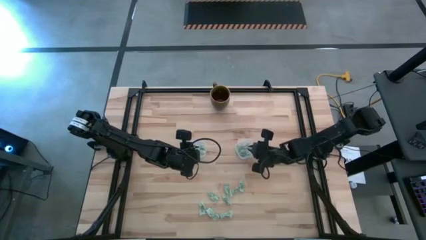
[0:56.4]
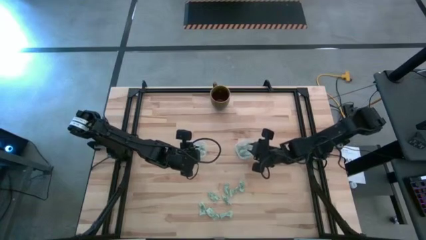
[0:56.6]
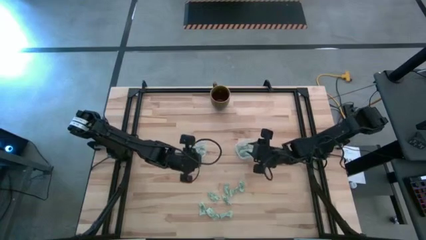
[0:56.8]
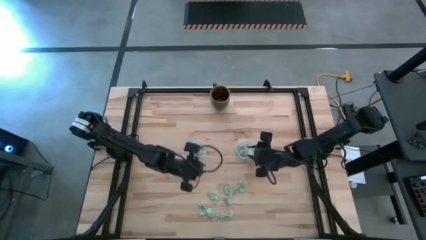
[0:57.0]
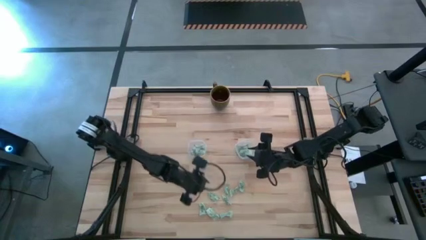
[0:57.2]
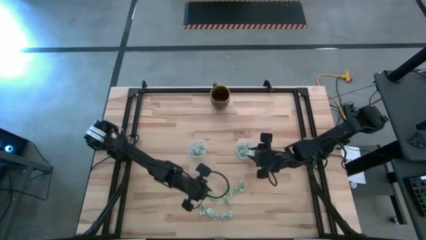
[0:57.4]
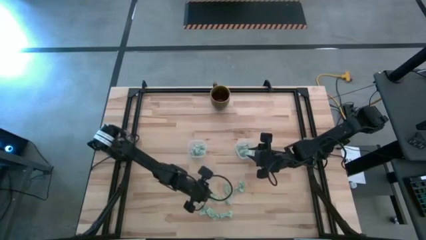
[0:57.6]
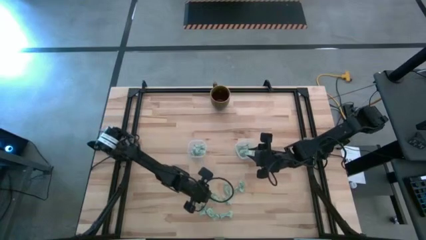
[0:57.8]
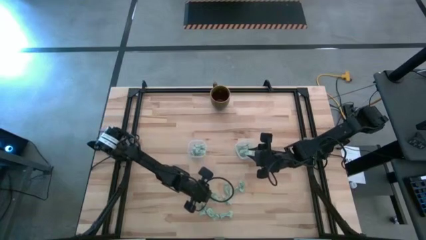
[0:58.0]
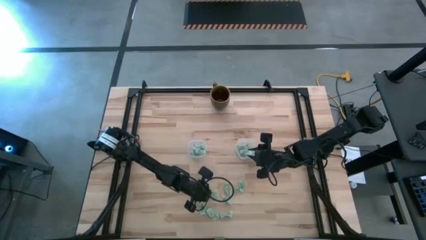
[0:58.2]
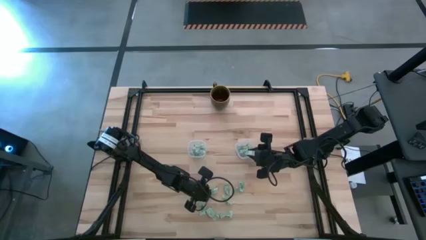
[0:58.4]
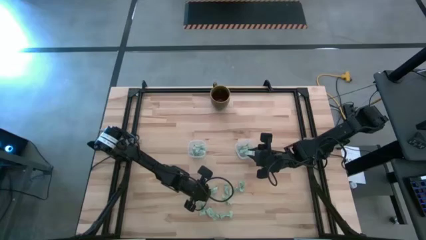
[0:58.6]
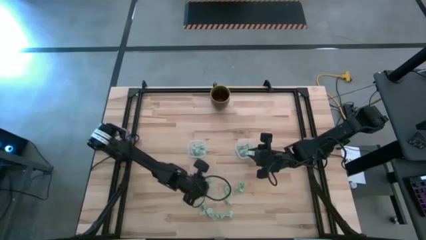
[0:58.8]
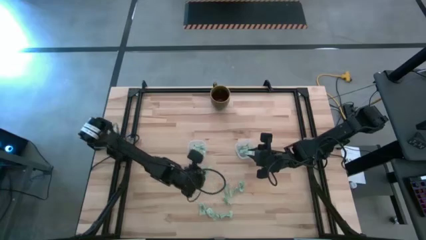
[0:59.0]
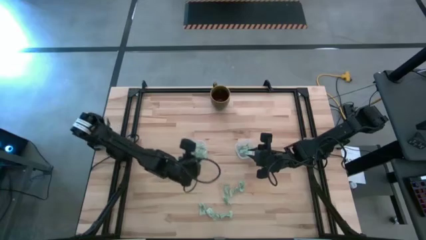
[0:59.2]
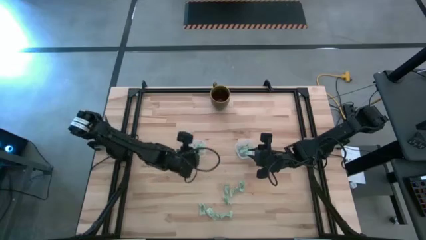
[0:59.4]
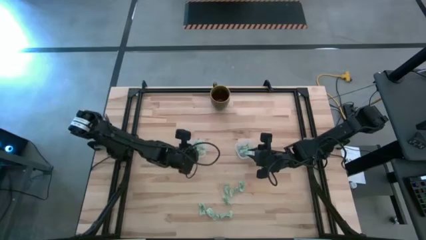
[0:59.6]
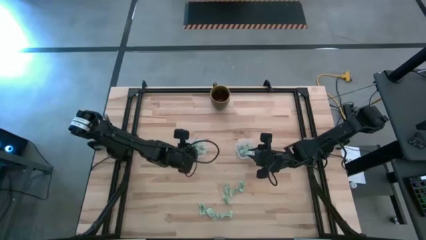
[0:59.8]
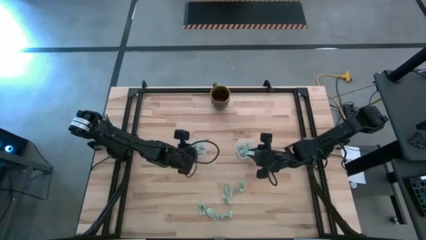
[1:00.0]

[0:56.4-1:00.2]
Task: Pick and place Stevia / Truvia into bins
Put the white stevia packet into the left transparent container

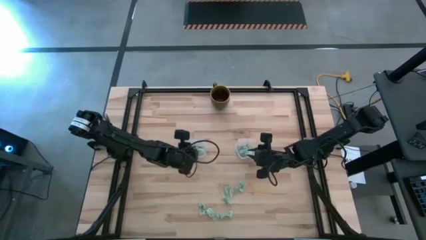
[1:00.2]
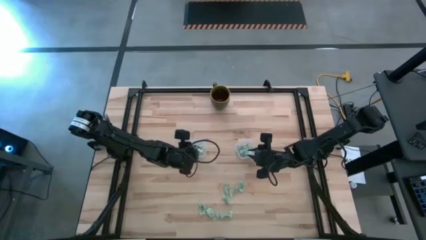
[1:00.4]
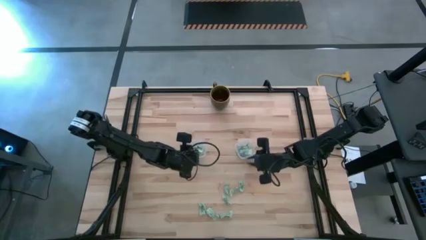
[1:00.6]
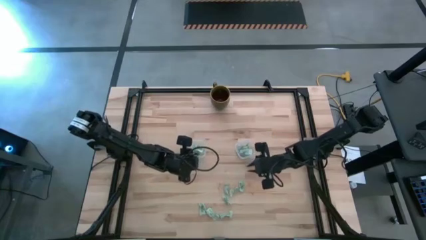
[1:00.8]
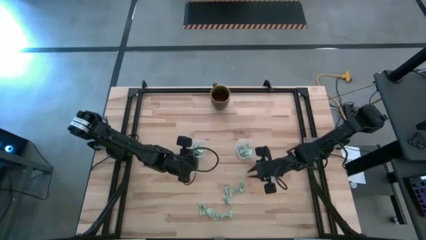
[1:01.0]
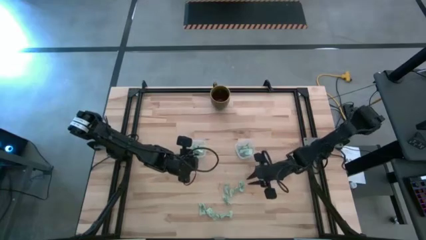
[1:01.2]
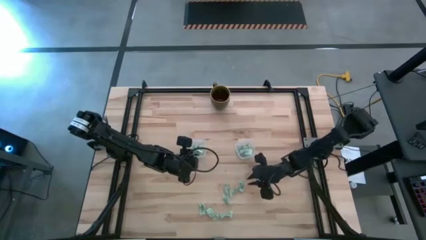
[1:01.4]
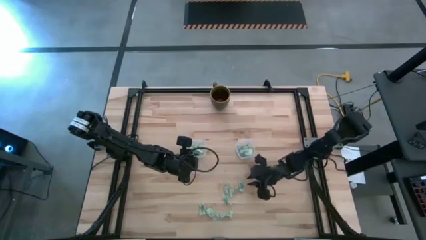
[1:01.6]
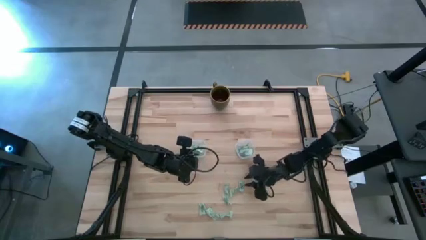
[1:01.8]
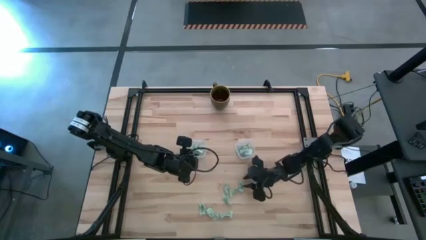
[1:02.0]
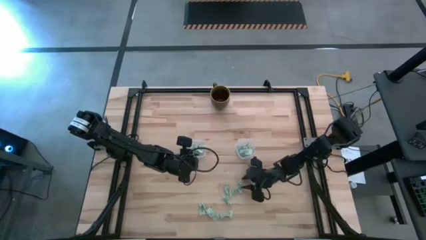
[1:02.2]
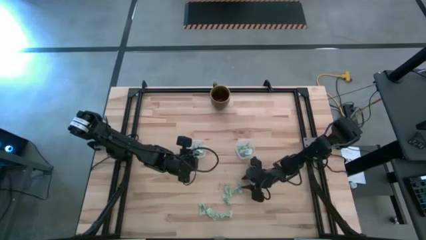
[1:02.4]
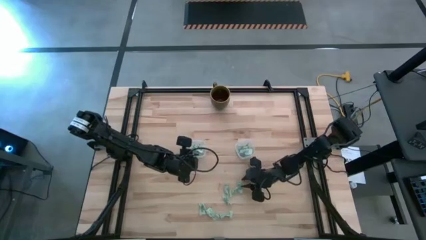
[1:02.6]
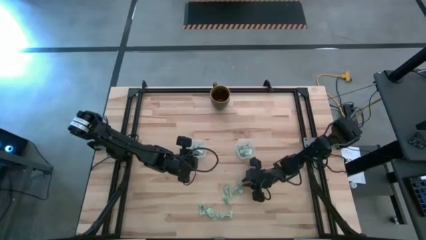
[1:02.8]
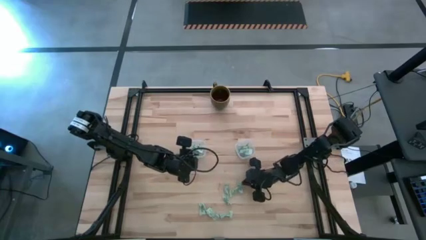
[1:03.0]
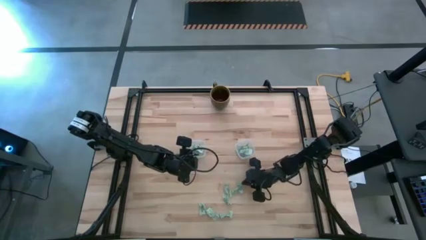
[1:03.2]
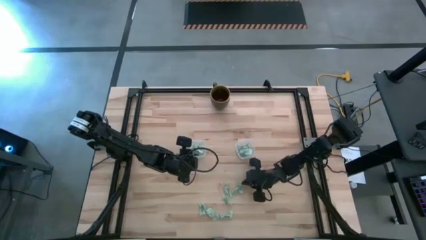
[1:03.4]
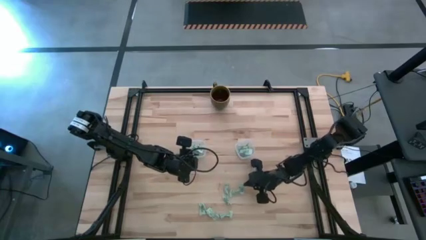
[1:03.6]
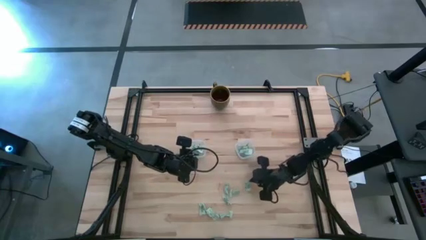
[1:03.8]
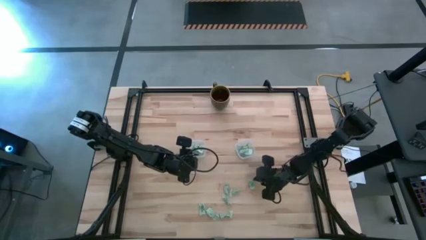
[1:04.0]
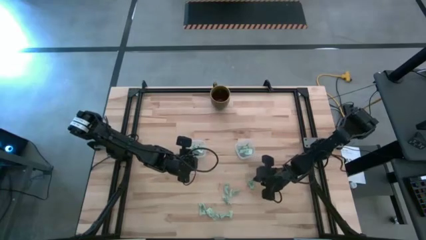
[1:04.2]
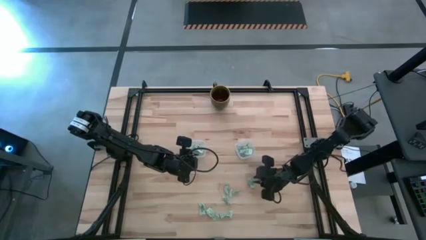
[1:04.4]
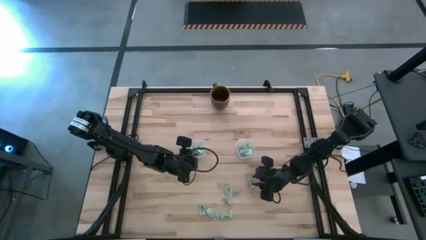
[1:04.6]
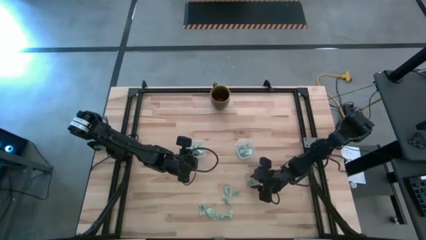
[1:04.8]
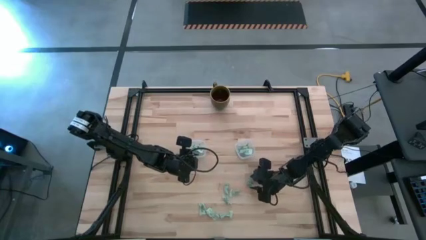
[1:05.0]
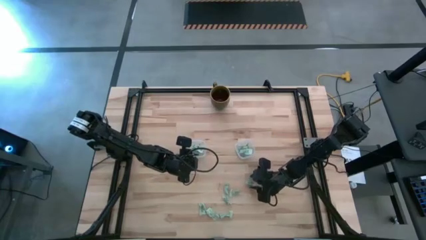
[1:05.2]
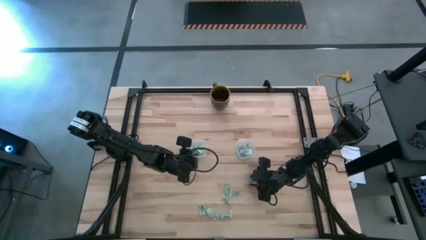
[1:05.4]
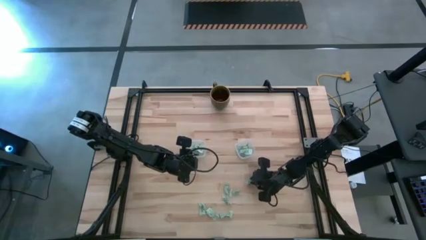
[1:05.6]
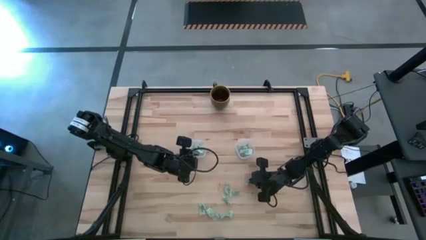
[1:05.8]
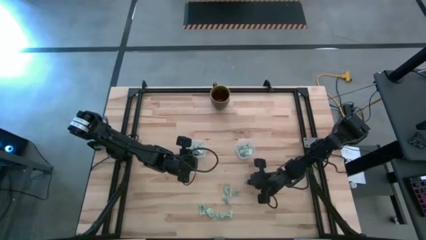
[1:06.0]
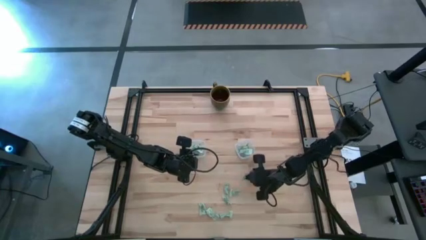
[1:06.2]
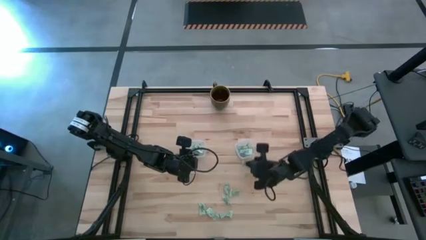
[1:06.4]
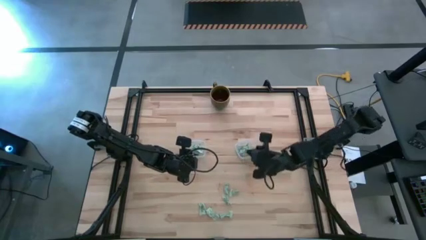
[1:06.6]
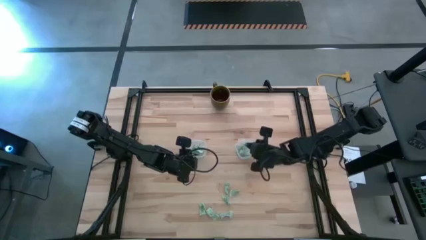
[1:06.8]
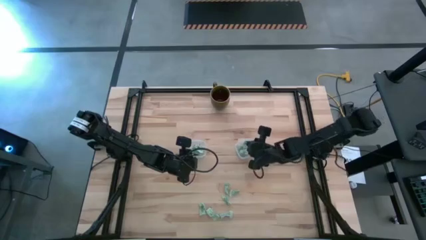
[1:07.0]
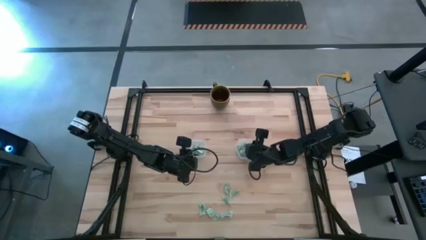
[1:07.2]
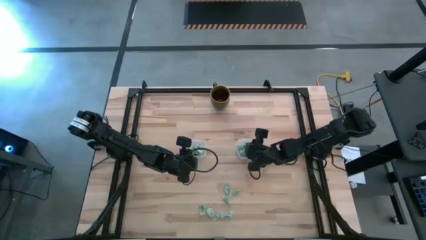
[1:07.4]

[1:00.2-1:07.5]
Put the white stevia packet into the right transparent container

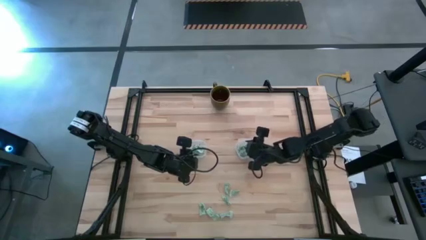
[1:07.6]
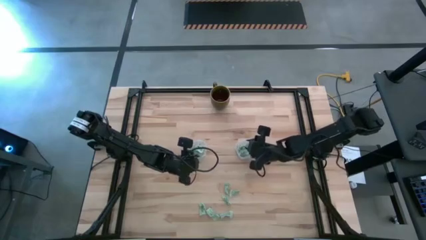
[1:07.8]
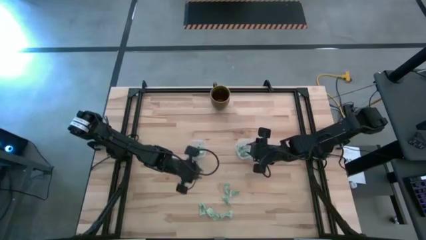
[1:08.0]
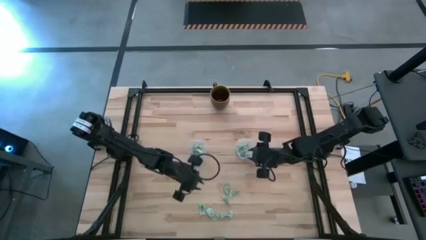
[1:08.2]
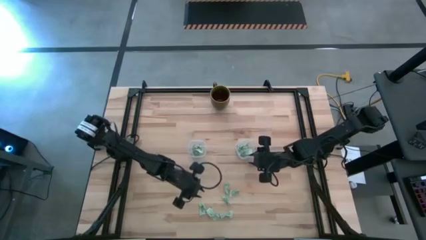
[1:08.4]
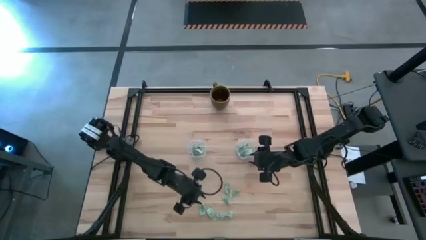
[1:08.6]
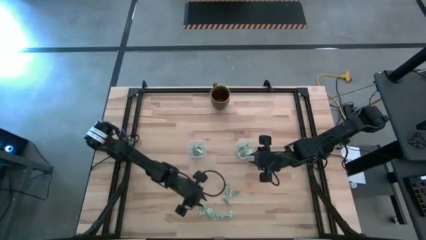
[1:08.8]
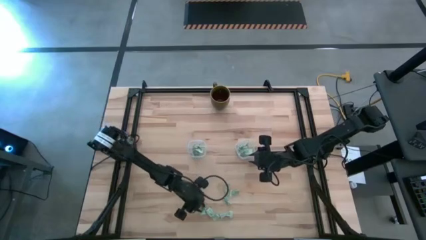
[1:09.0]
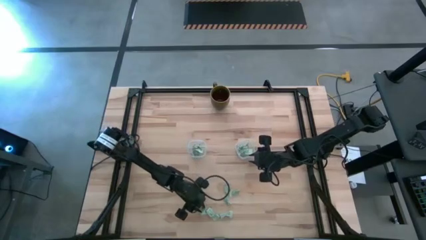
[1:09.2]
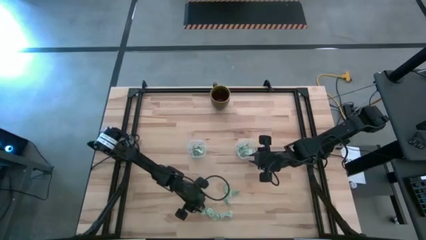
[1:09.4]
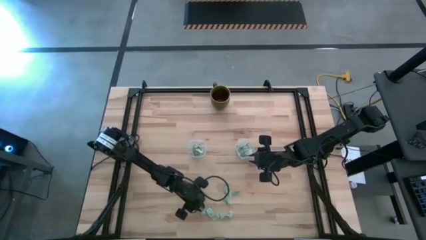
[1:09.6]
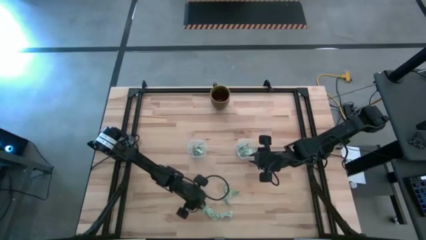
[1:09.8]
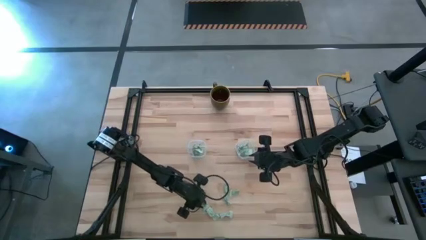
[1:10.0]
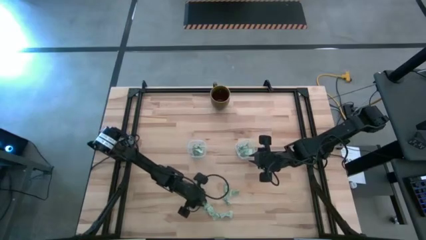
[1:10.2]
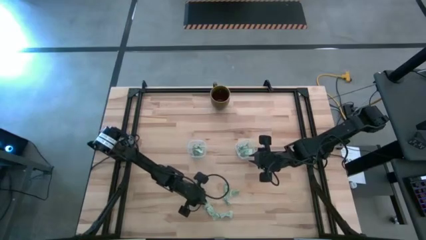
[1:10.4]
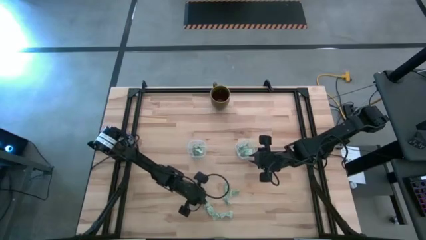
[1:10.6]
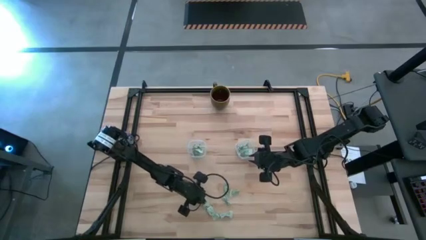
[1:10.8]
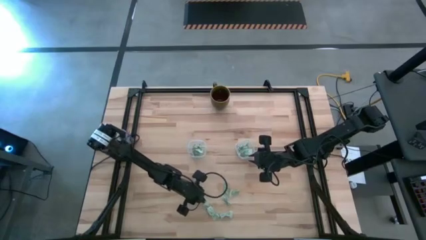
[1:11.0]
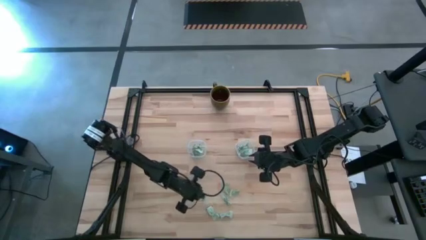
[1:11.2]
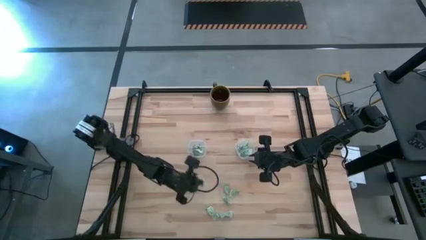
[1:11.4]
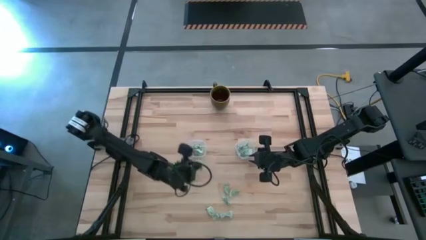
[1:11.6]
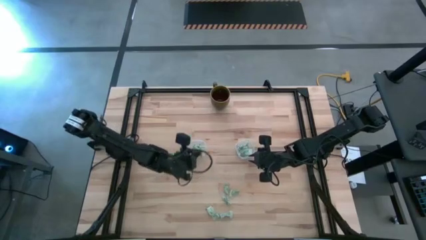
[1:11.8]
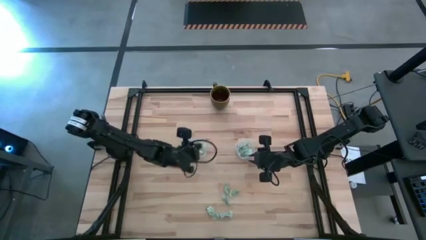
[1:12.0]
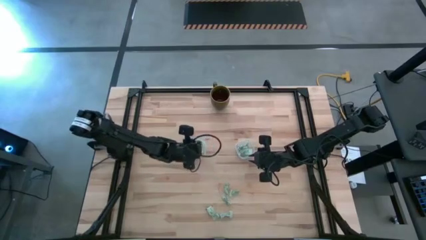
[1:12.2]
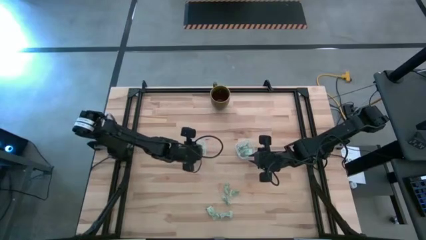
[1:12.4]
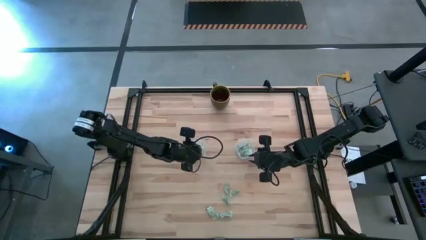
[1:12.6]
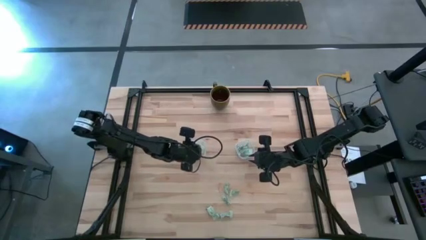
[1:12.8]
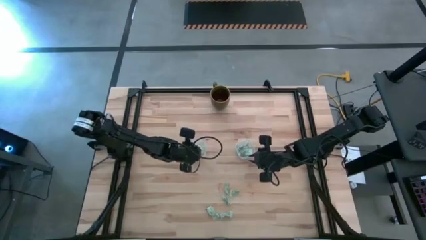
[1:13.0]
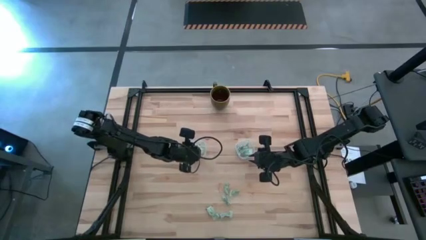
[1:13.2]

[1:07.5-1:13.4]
Put the white stevia packet into the left transparent container
